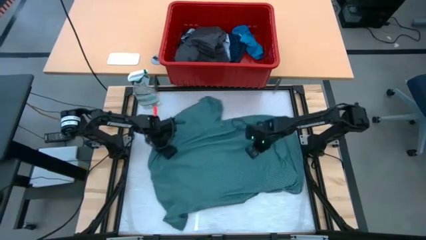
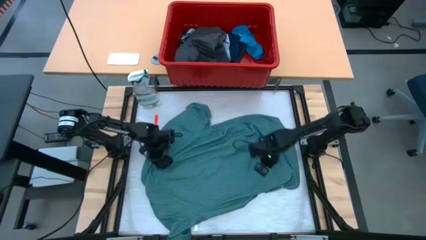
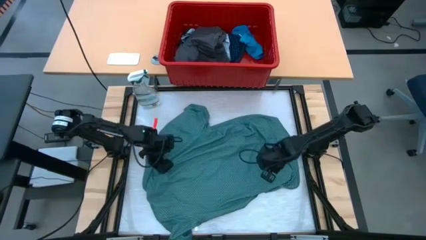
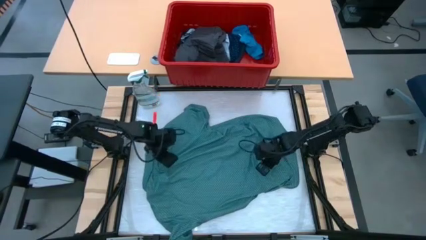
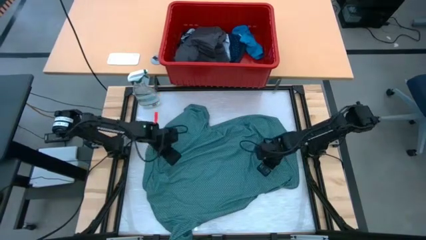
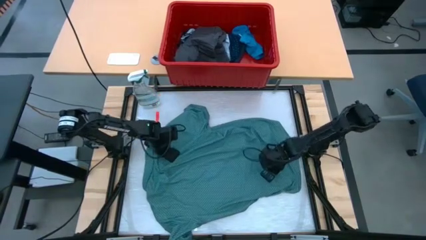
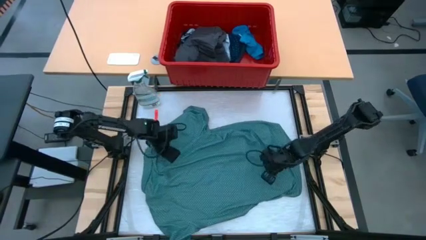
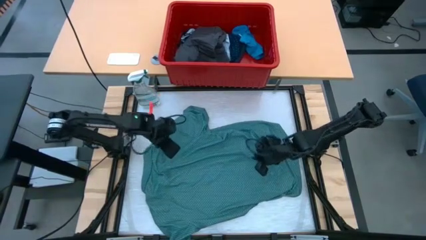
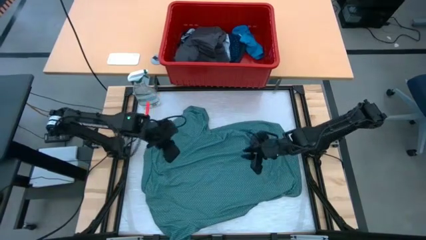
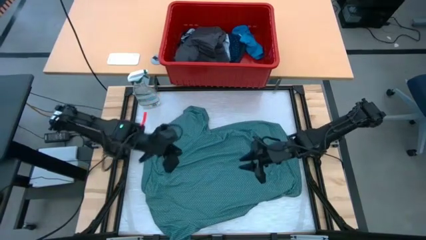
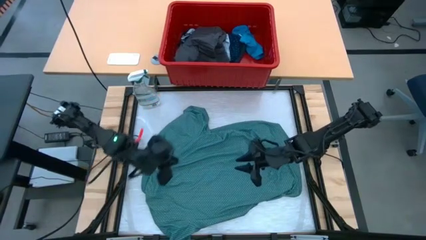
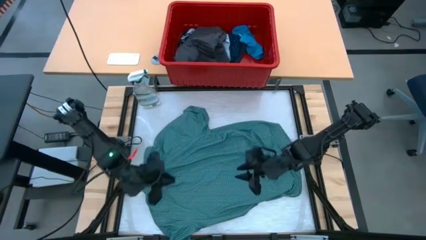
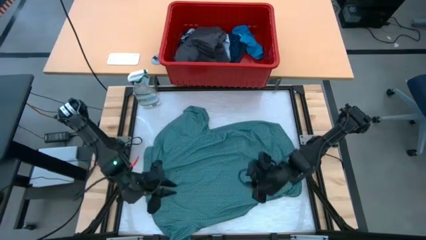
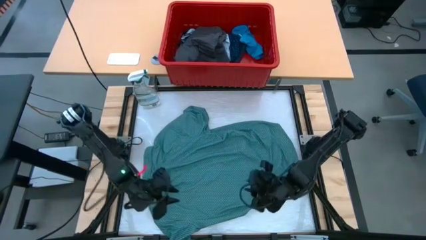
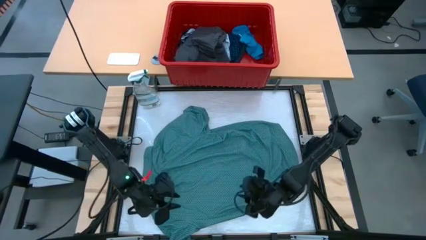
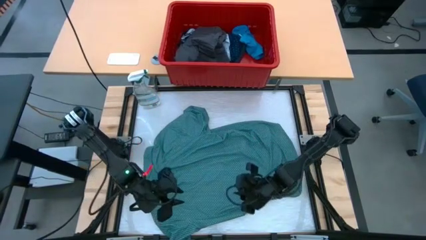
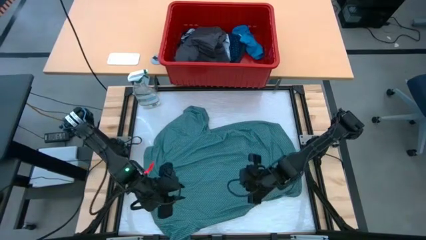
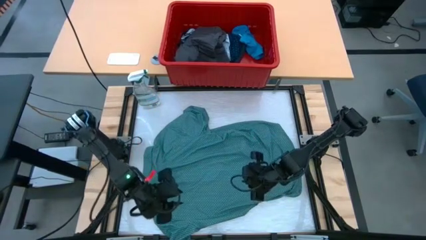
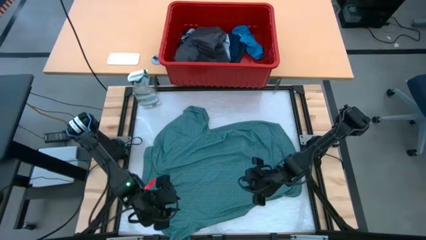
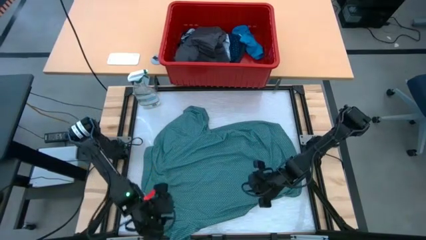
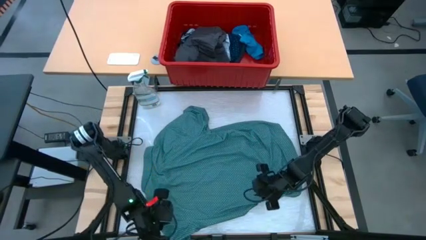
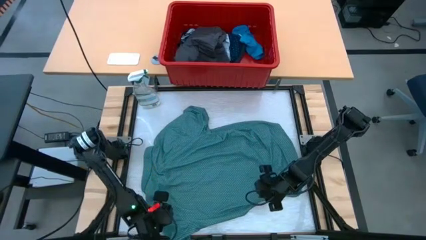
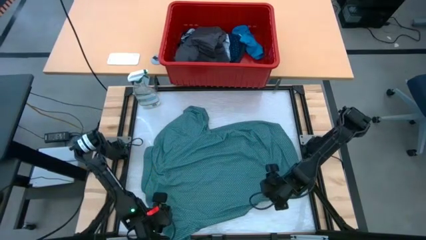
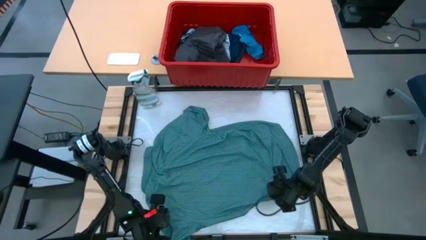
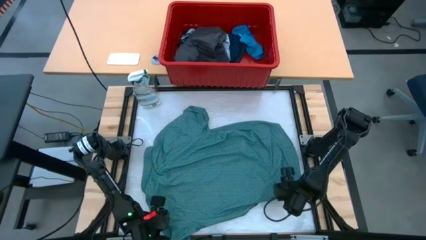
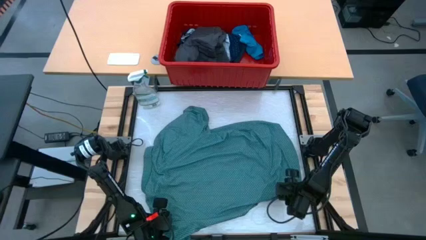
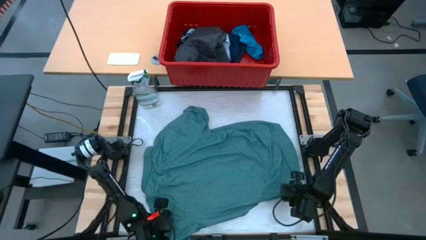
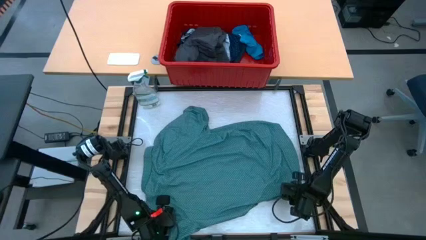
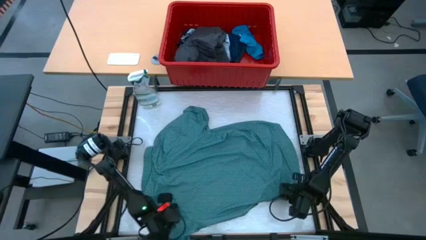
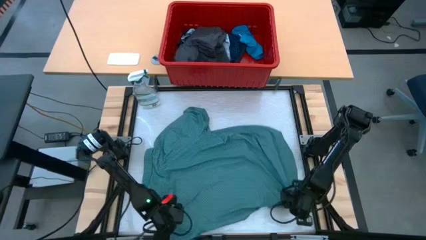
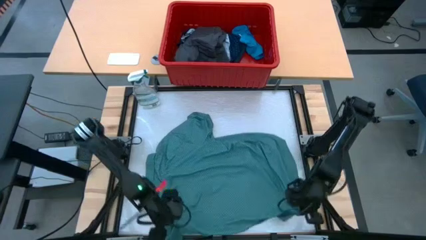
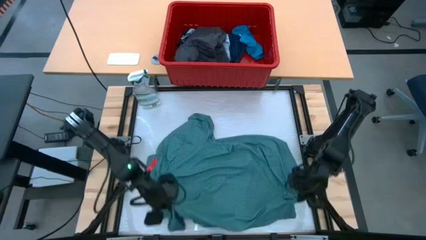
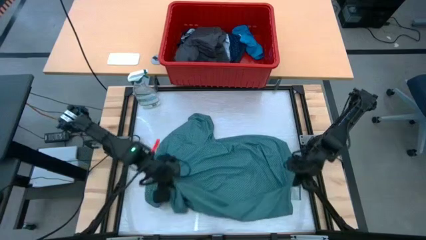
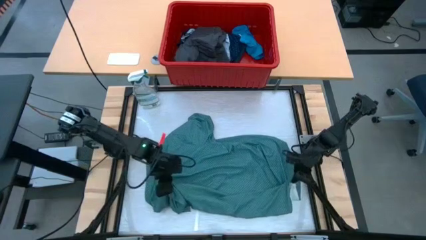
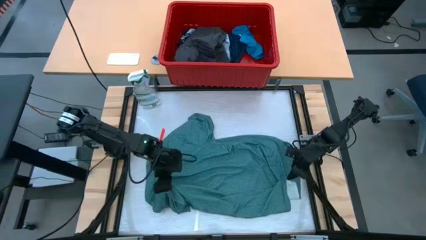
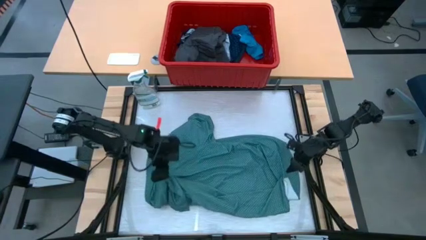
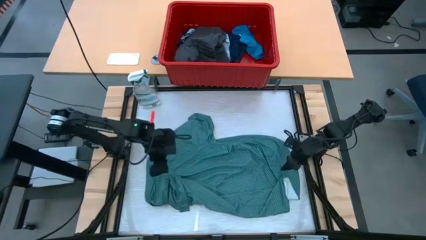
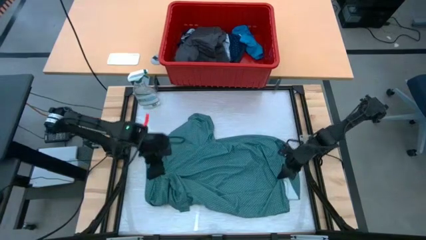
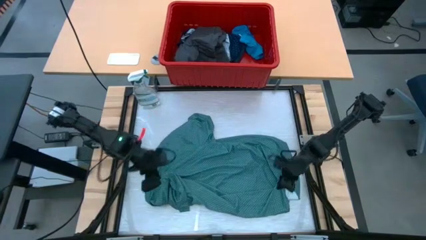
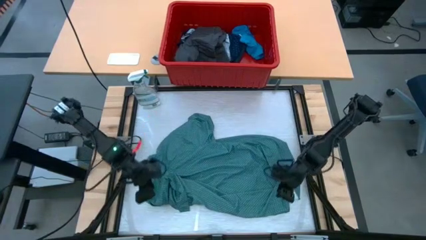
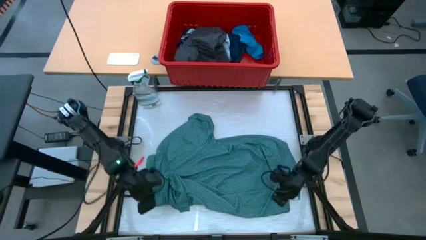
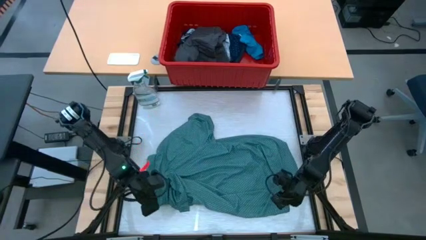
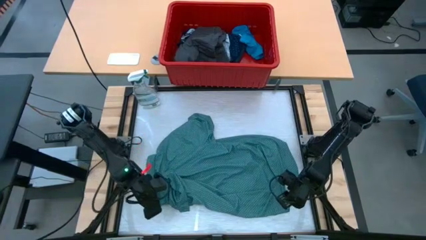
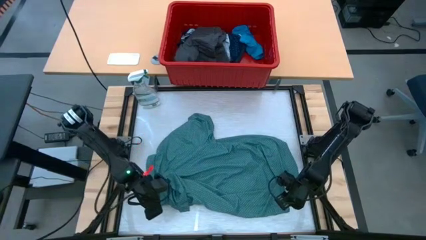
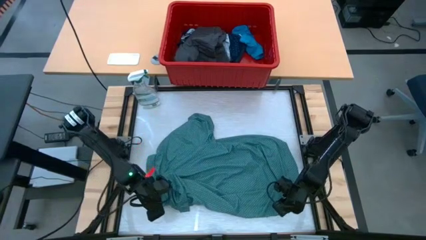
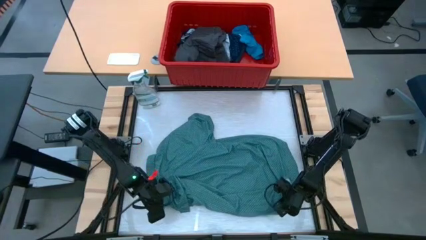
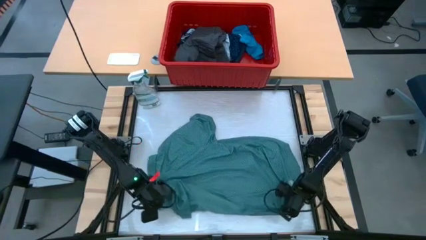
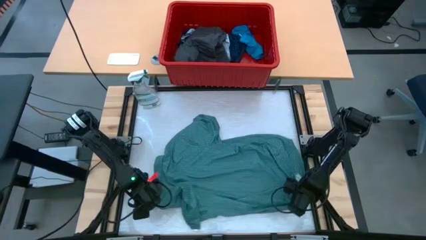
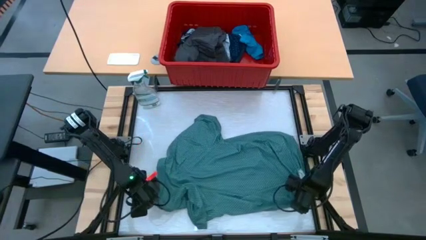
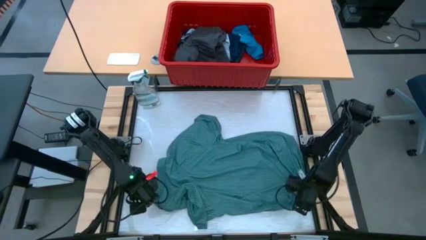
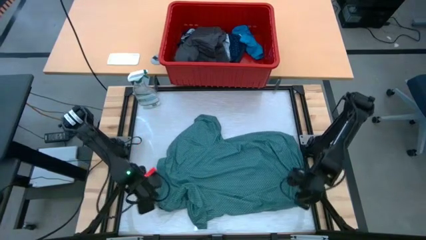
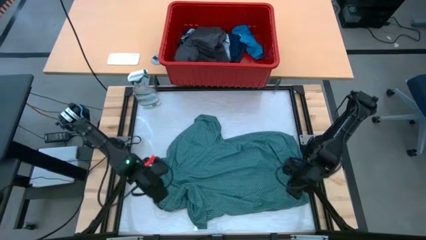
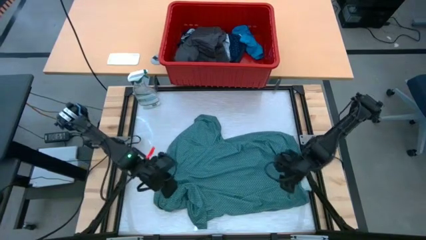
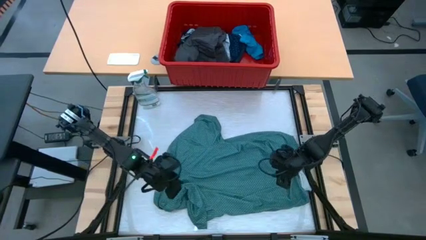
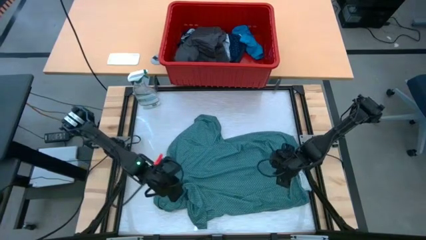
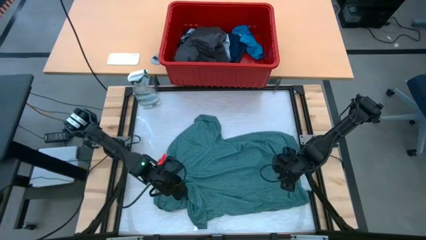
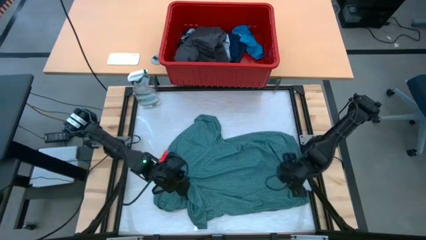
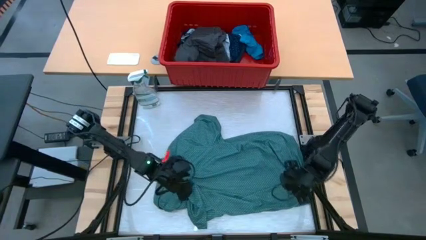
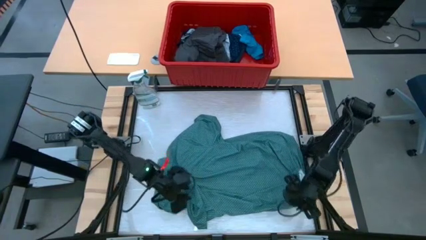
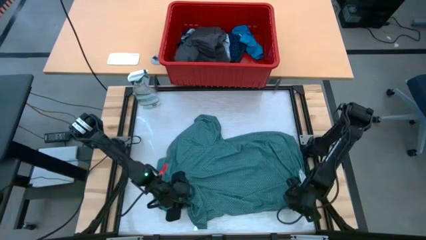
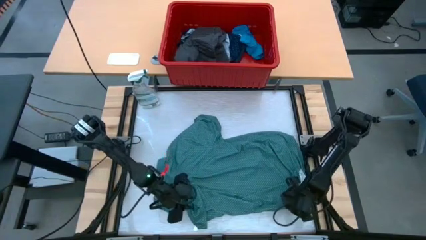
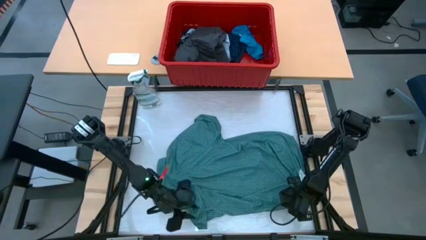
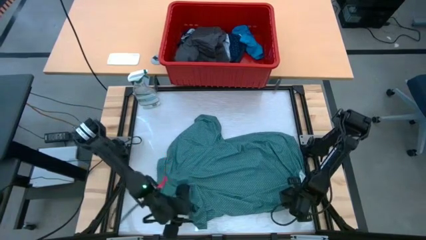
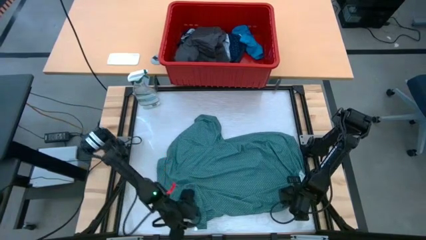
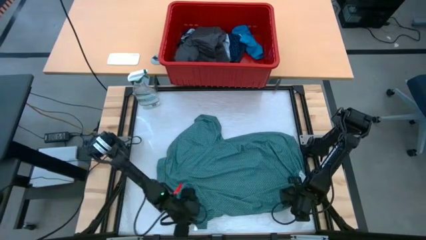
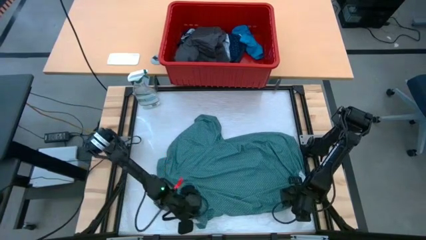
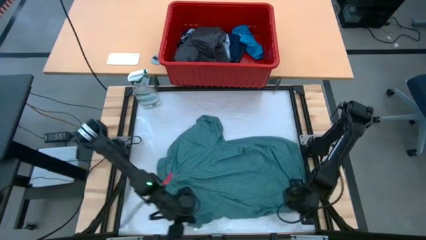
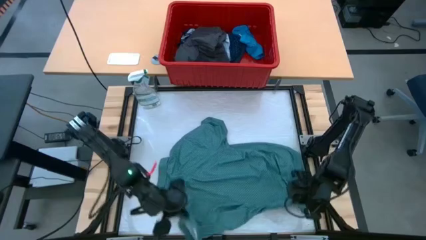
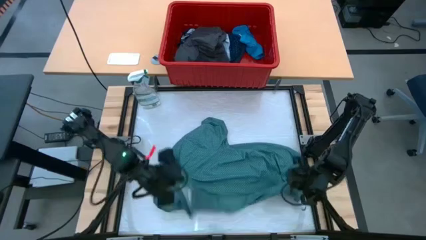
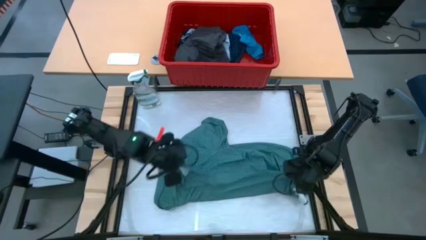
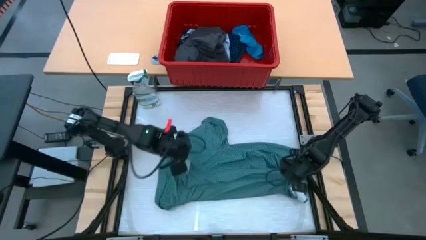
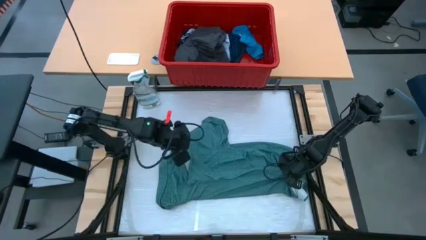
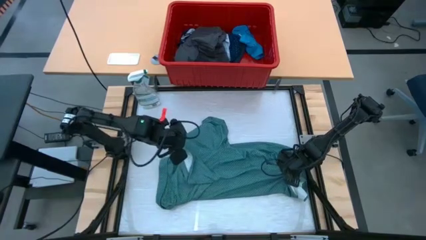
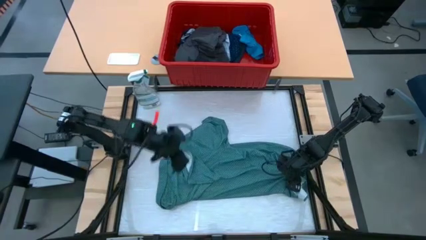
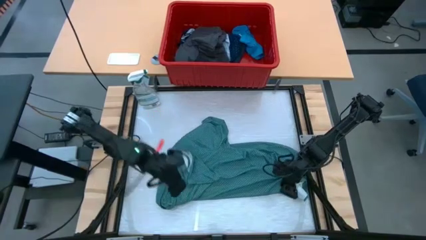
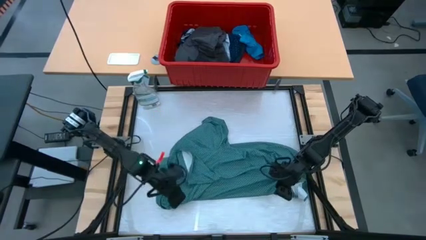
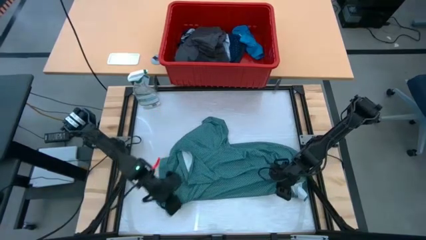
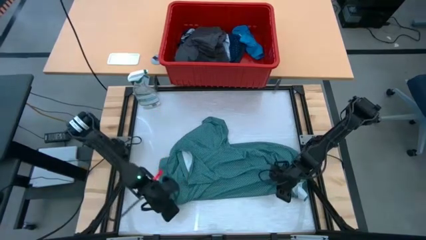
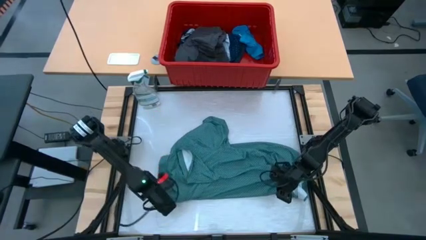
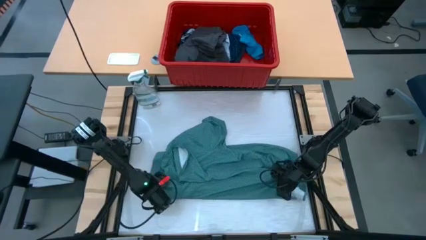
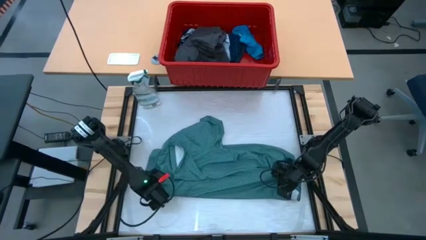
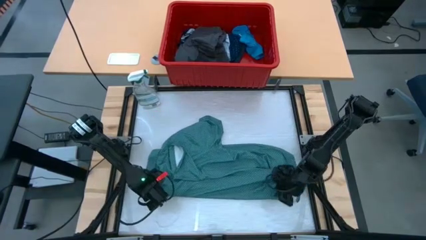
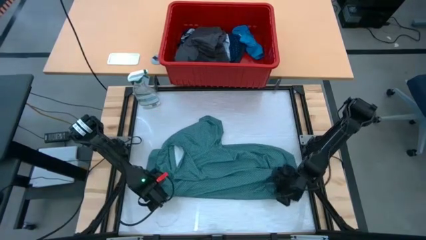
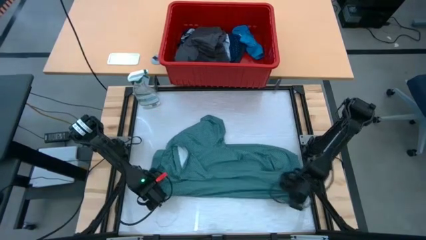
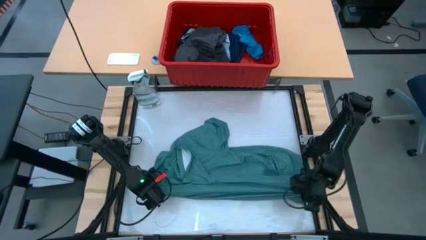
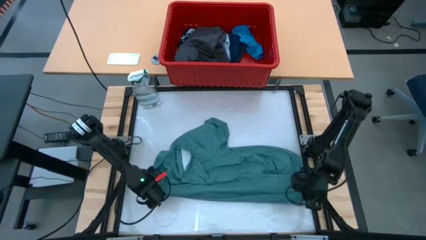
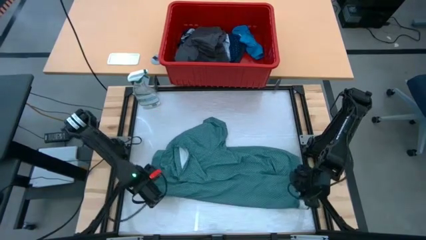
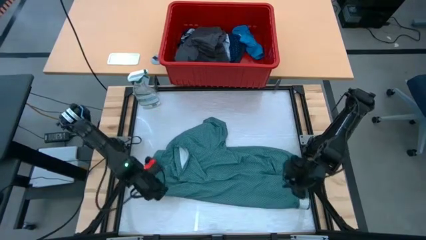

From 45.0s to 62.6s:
Task: Fold laundry
Fold the green shirt
